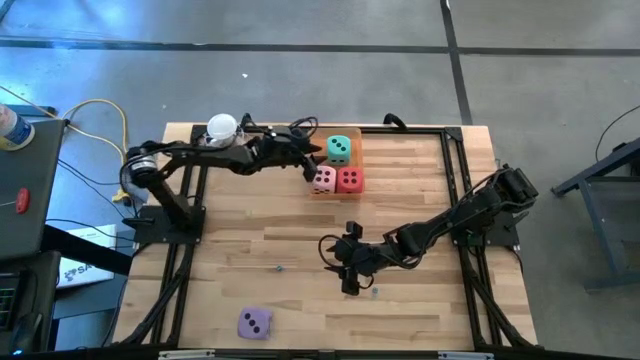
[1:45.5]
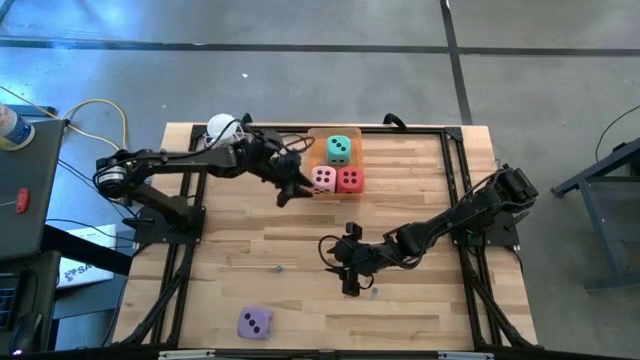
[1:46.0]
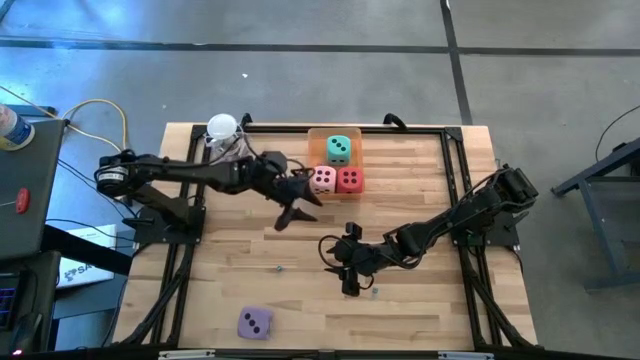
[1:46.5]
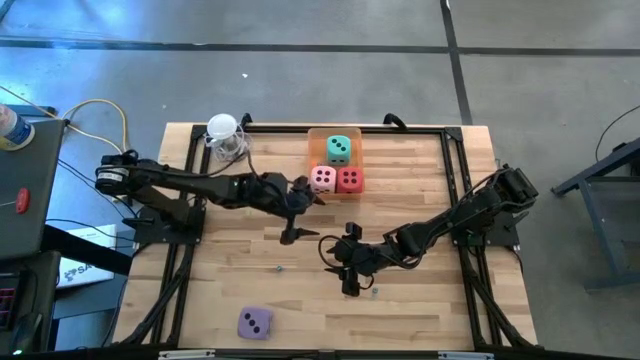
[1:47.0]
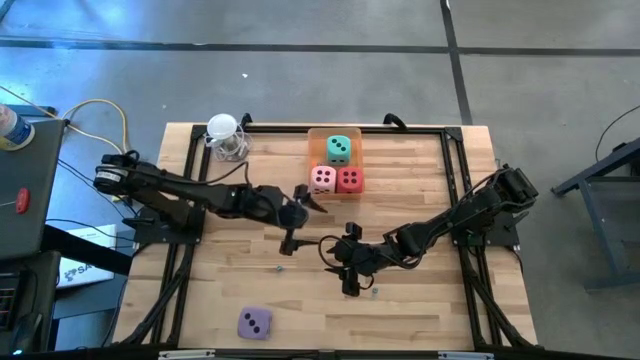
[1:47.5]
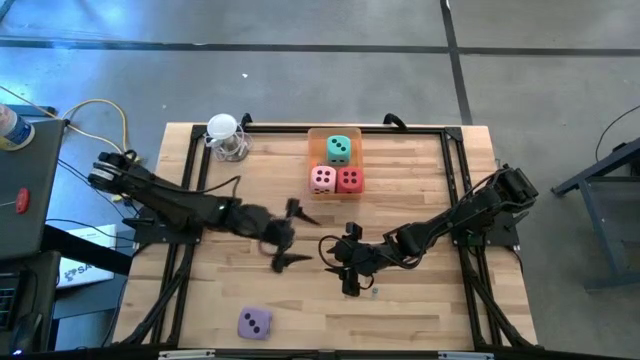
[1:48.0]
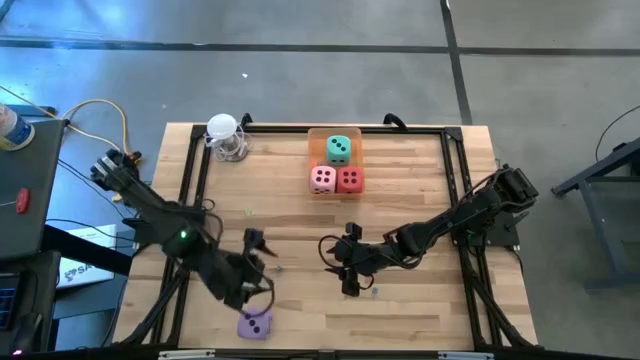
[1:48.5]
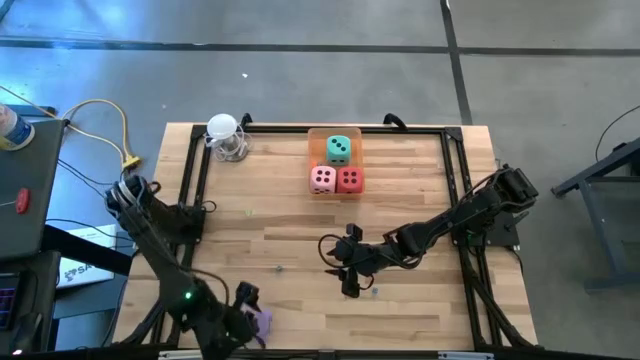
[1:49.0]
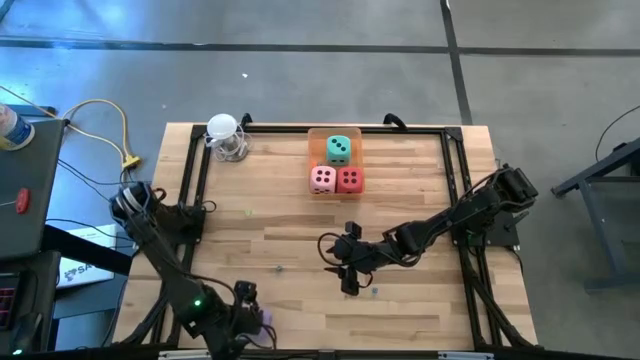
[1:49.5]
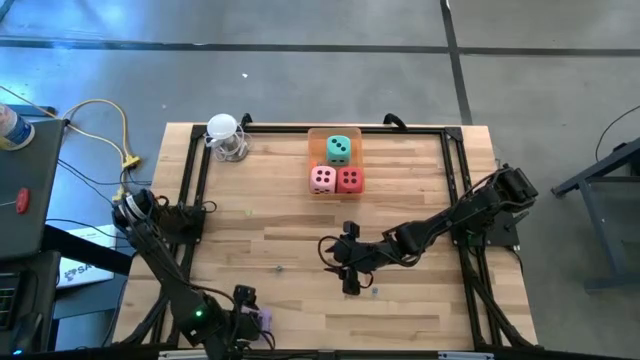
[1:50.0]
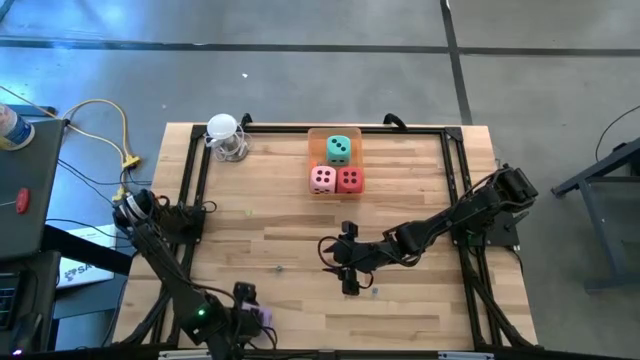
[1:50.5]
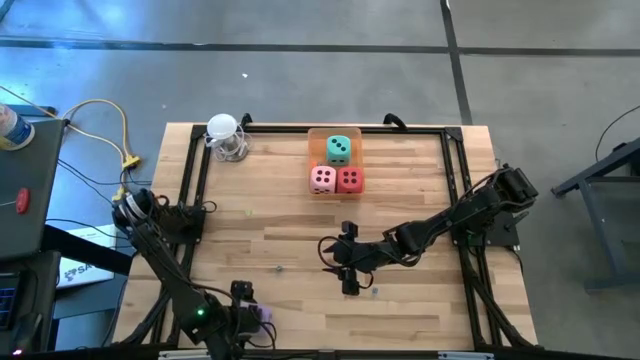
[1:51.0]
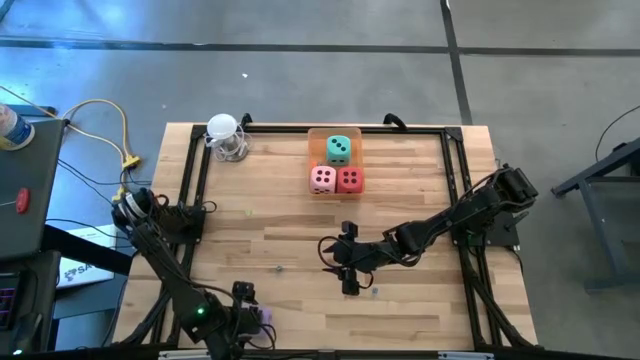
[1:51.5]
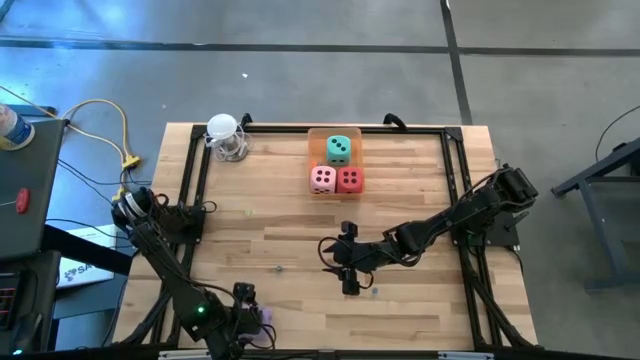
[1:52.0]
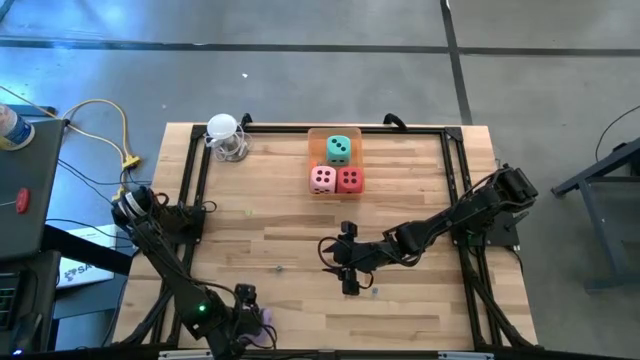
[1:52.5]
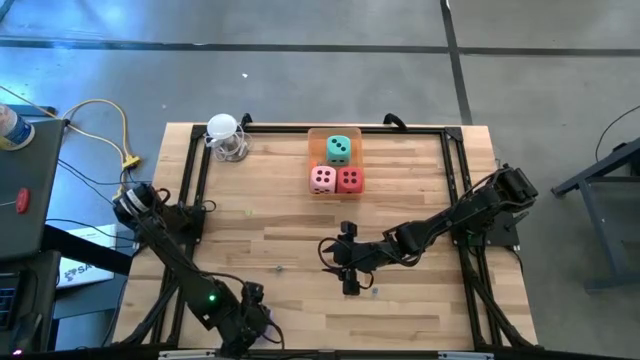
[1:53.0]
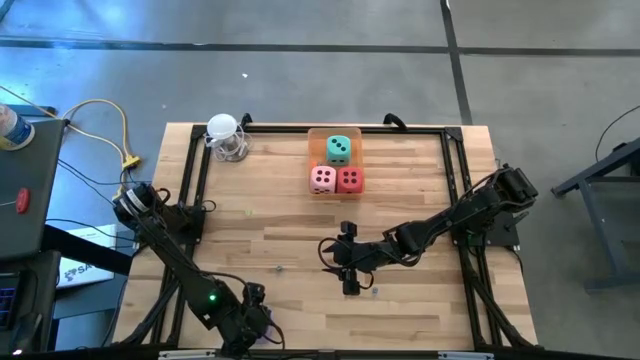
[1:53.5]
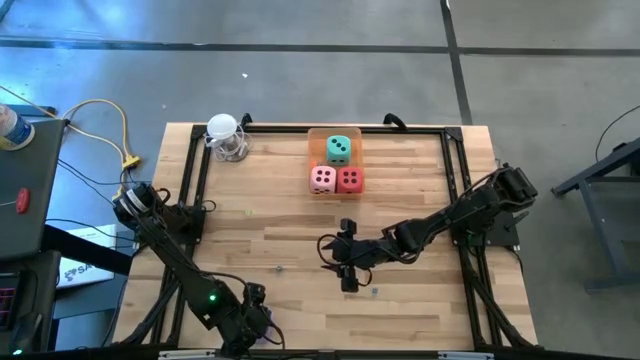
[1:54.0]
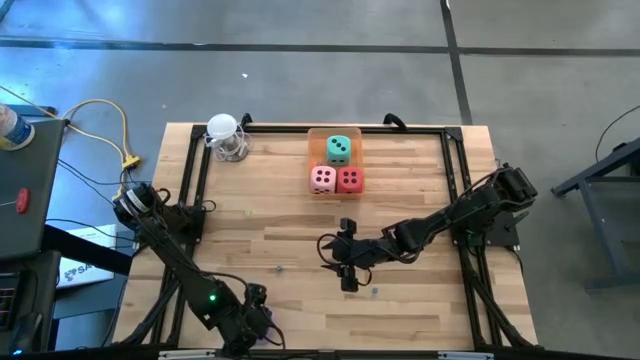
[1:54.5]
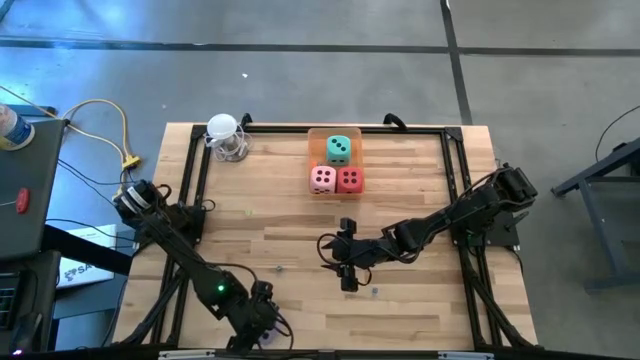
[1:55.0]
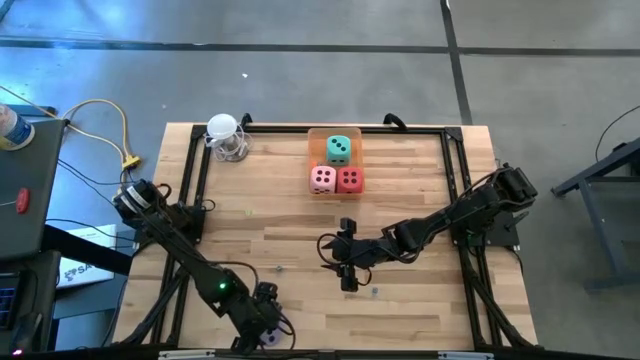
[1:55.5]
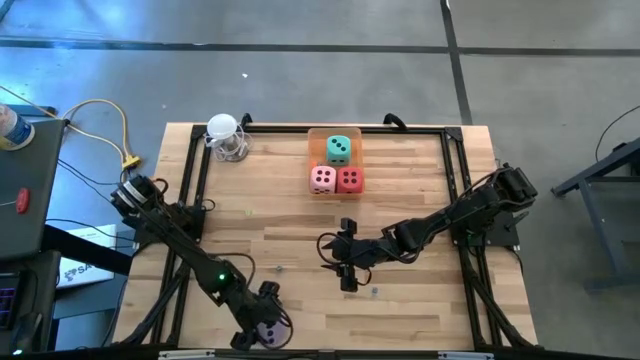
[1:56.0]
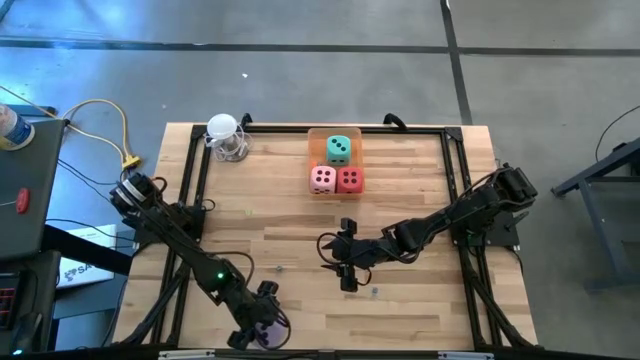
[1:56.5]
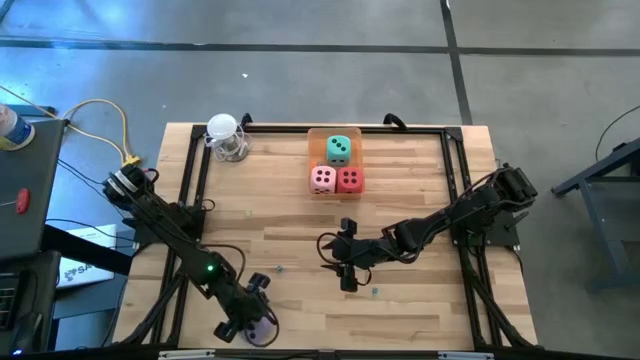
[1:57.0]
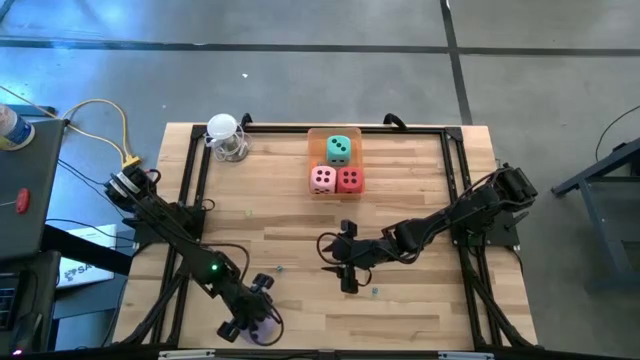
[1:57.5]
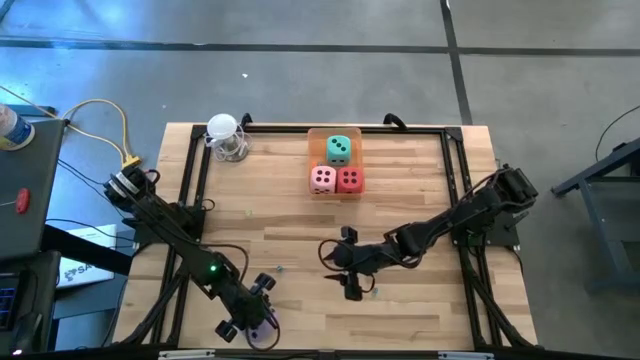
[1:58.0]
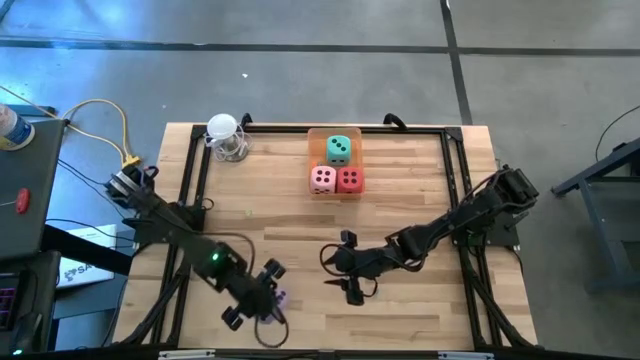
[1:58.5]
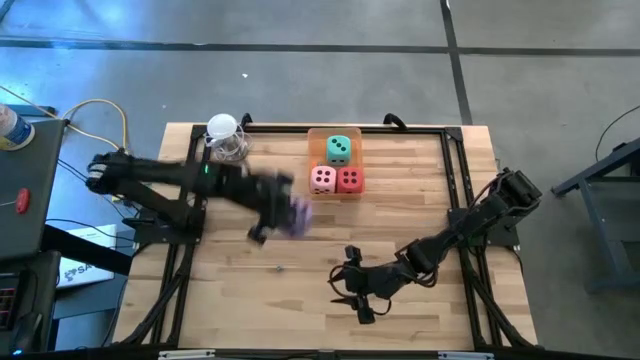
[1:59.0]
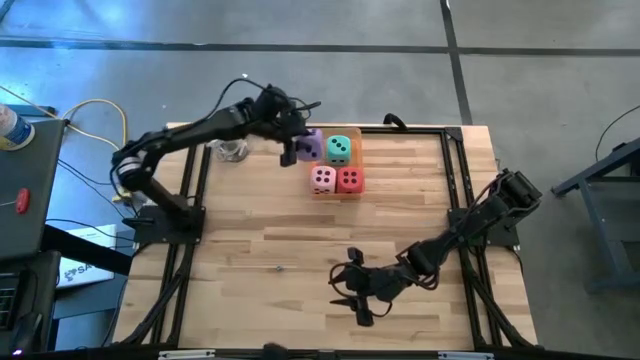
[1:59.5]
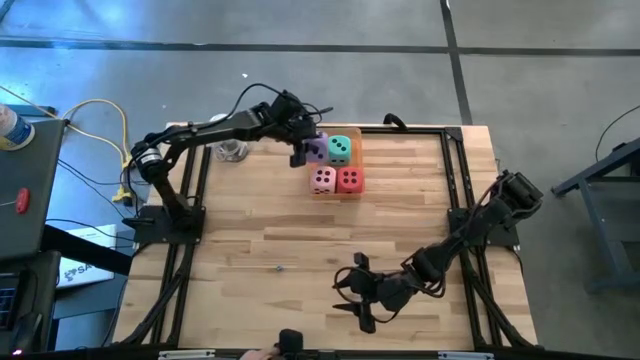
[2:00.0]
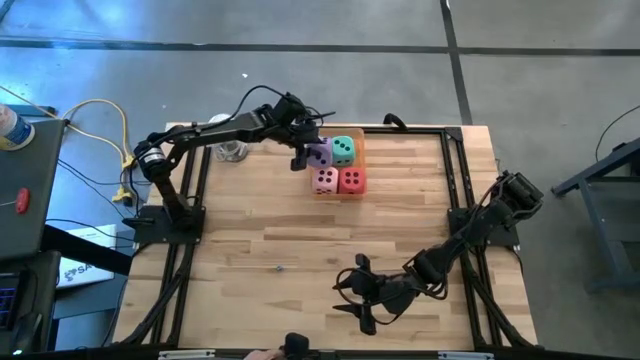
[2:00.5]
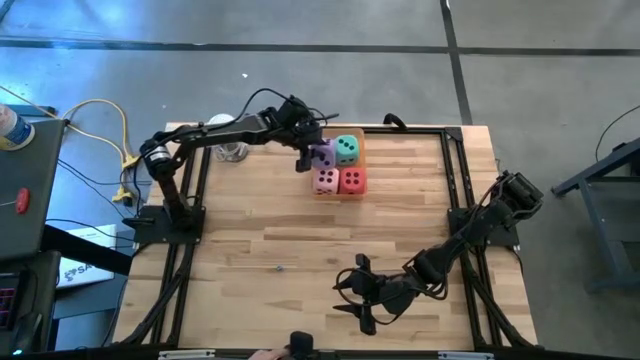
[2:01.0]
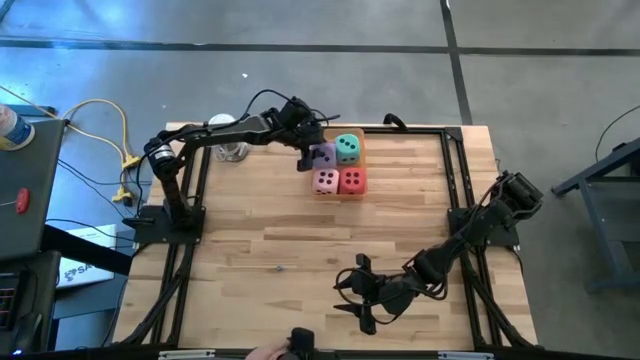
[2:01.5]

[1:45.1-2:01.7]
Task: Pick & Place Dice
Put the purple die into the orange bin

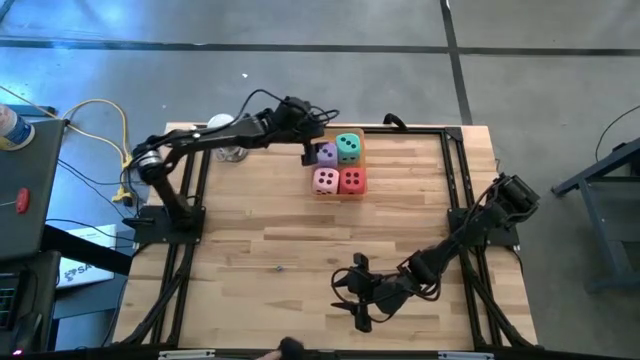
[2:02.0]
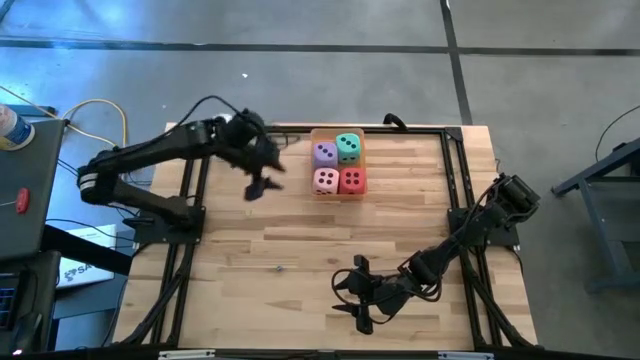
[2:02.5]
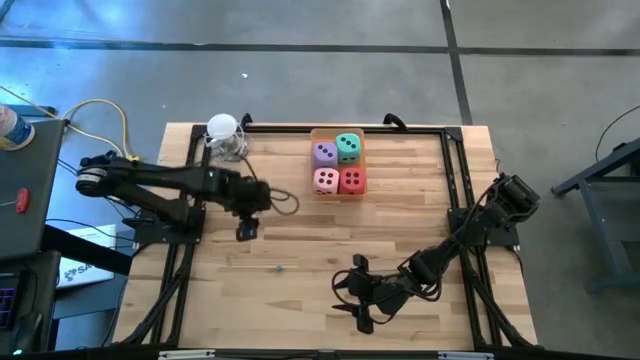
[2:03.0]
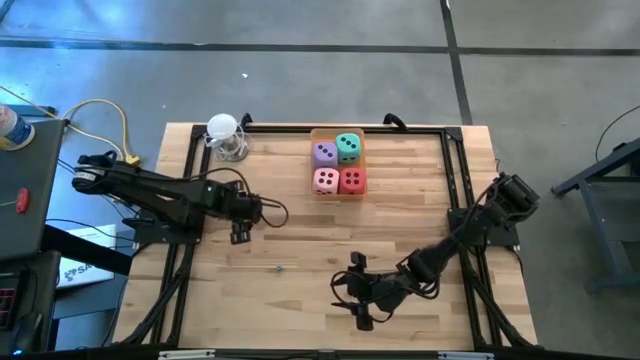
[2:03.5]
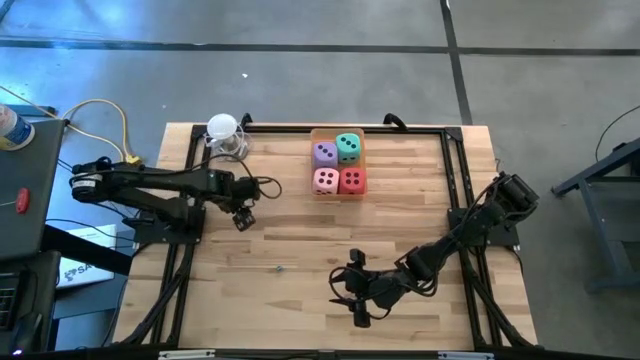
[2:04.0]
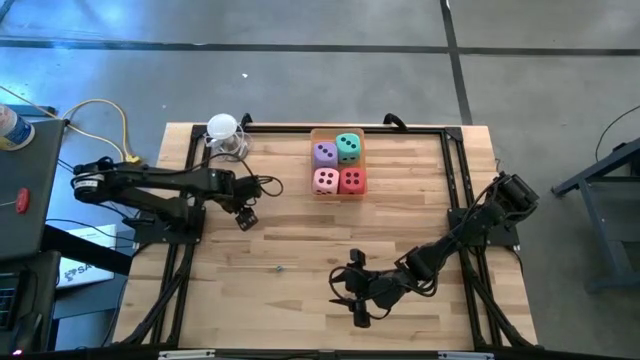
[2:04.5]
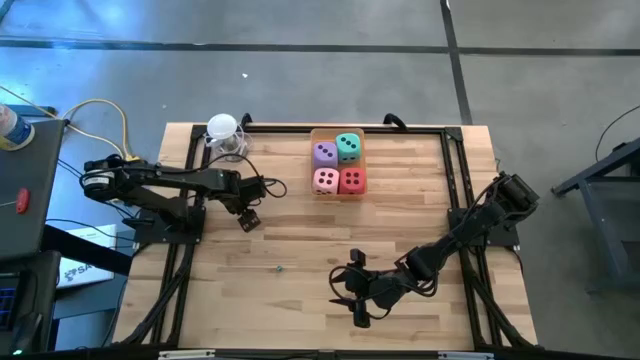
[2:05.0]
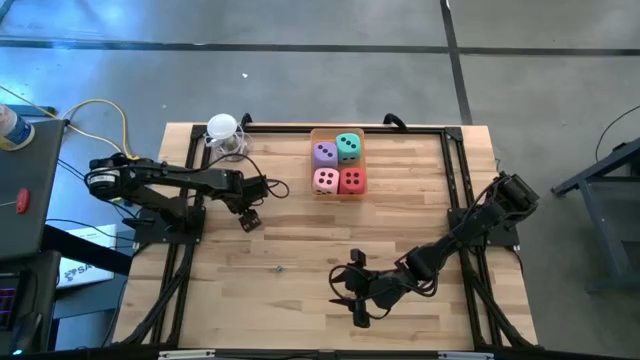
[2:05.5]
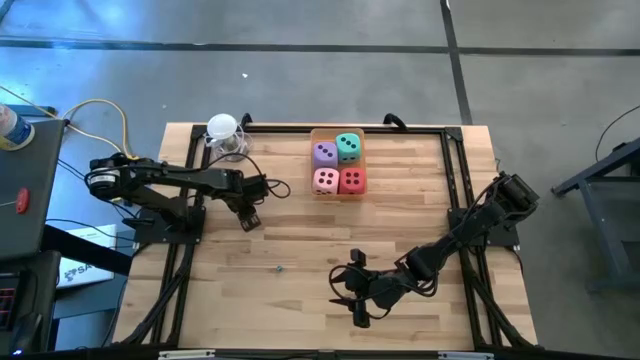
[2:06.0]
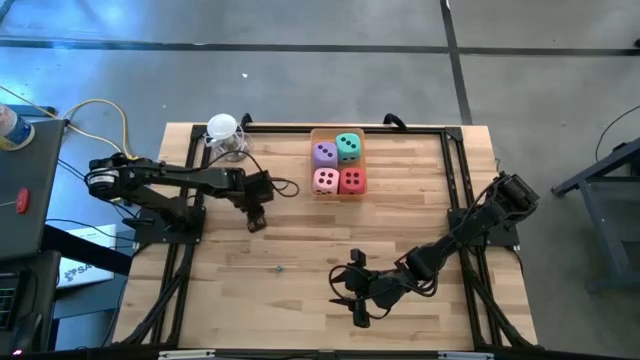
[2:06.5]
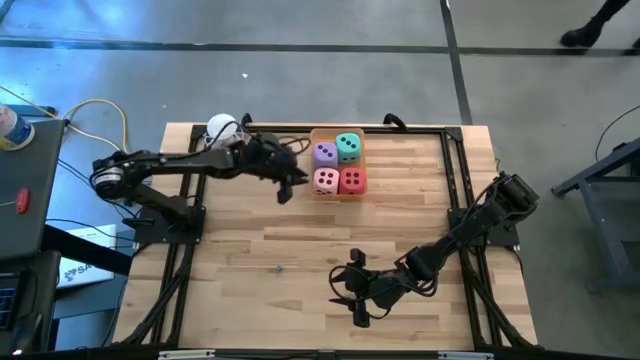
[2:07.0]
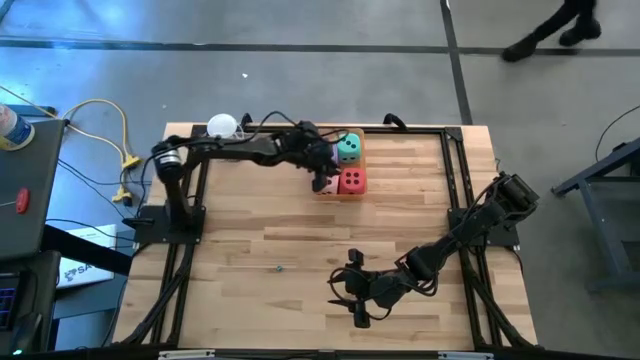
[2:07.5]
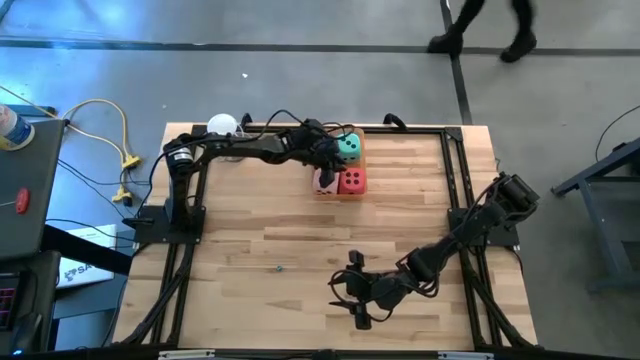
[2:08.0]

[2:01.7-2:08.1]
Put the green die into the orange bin
